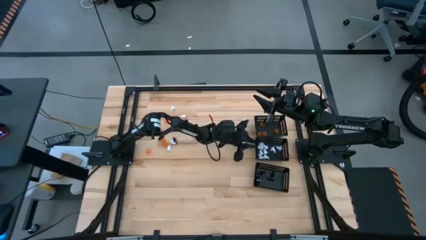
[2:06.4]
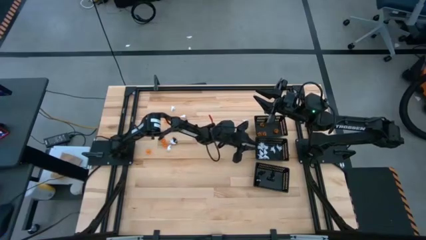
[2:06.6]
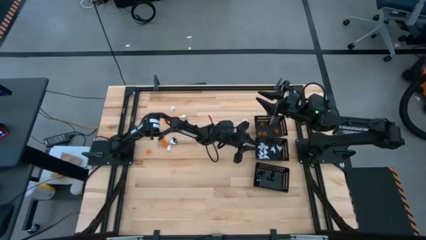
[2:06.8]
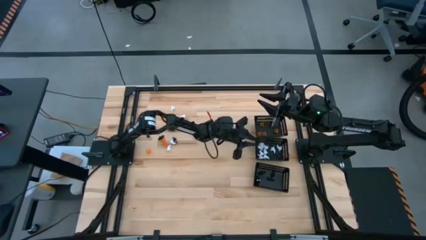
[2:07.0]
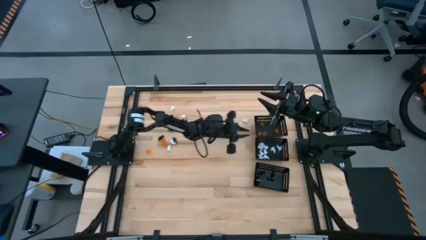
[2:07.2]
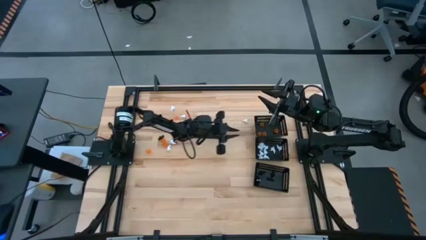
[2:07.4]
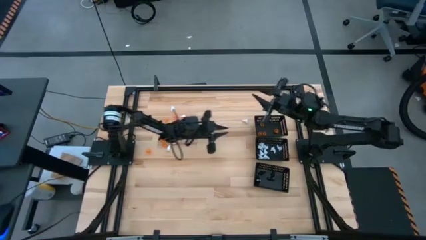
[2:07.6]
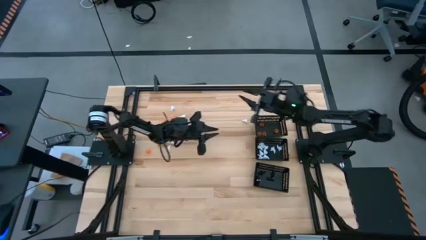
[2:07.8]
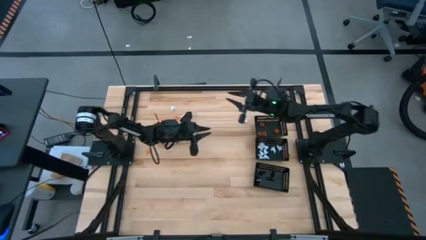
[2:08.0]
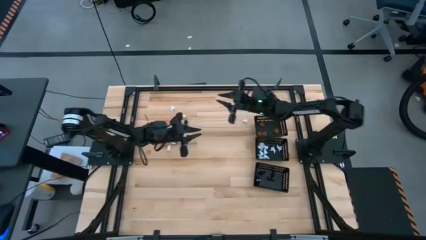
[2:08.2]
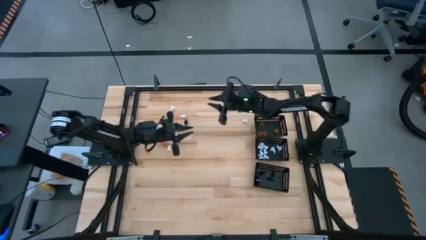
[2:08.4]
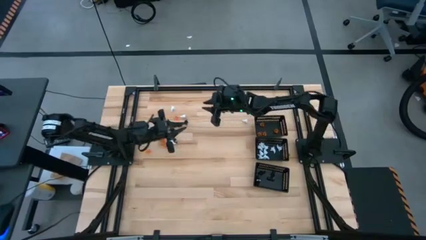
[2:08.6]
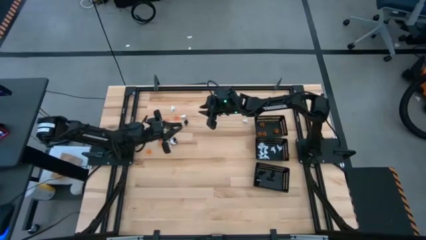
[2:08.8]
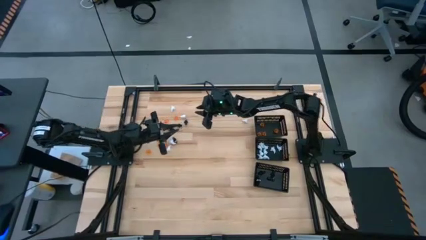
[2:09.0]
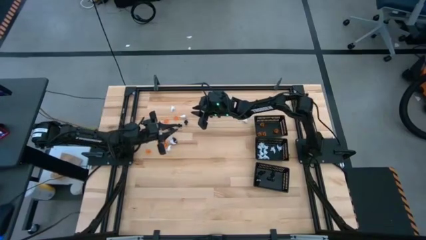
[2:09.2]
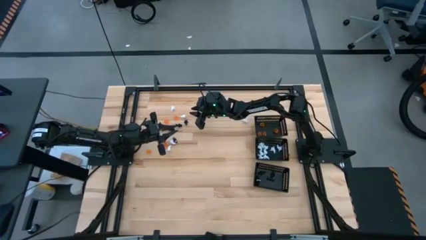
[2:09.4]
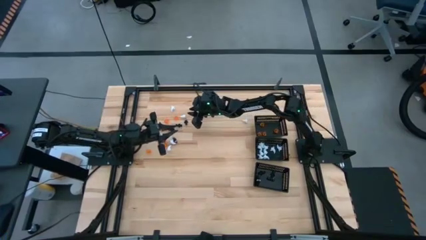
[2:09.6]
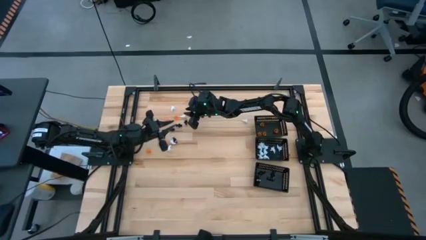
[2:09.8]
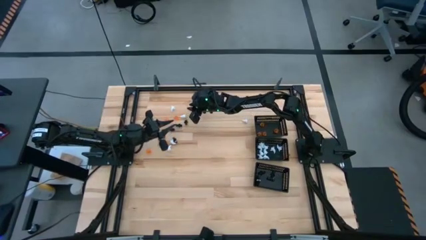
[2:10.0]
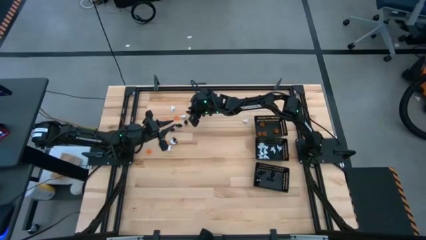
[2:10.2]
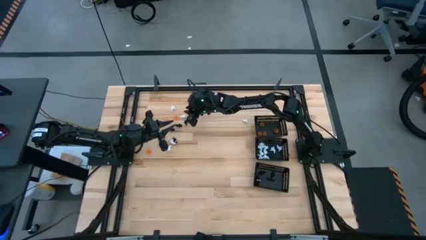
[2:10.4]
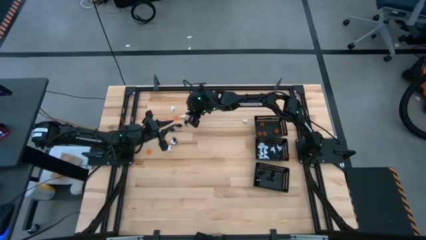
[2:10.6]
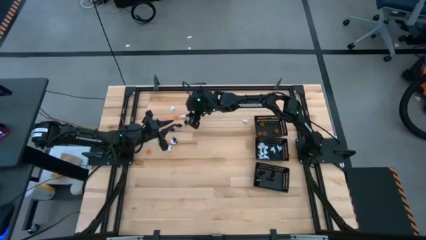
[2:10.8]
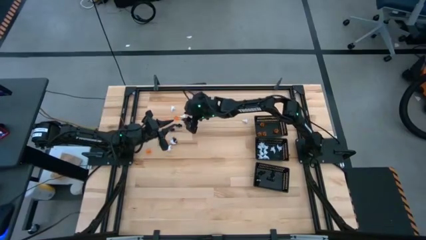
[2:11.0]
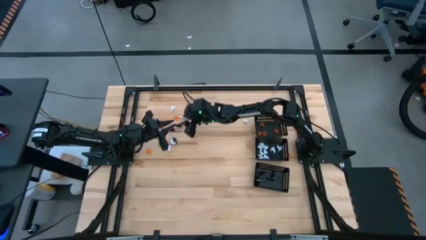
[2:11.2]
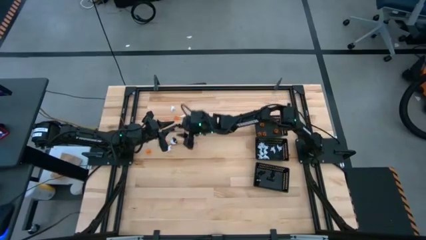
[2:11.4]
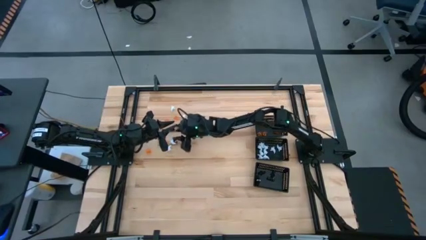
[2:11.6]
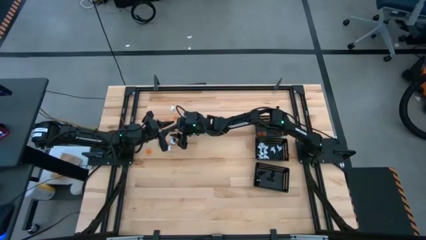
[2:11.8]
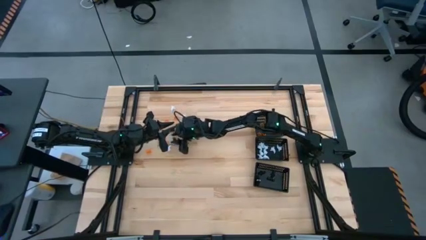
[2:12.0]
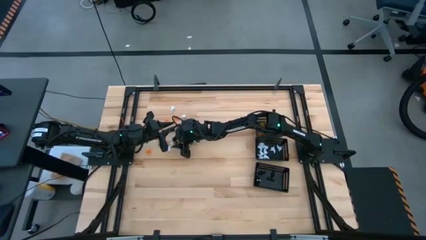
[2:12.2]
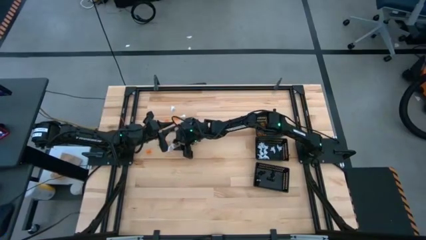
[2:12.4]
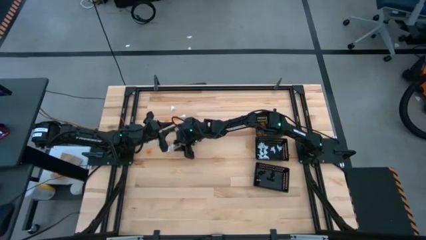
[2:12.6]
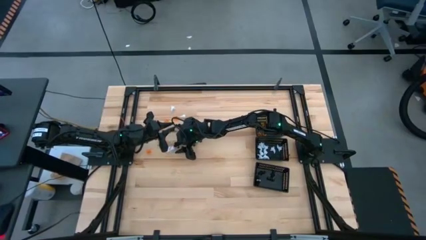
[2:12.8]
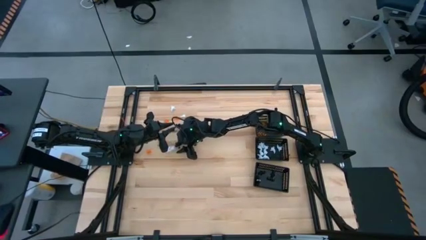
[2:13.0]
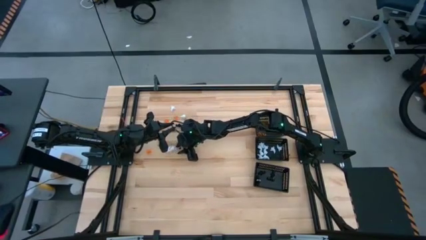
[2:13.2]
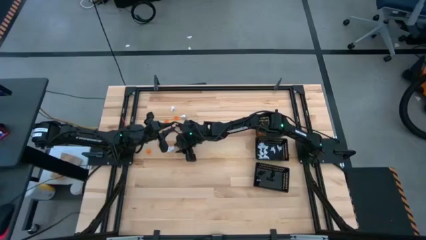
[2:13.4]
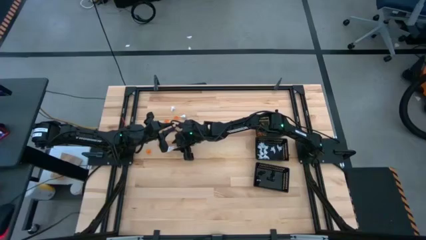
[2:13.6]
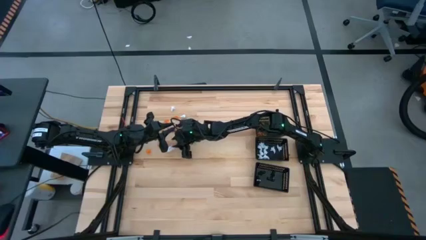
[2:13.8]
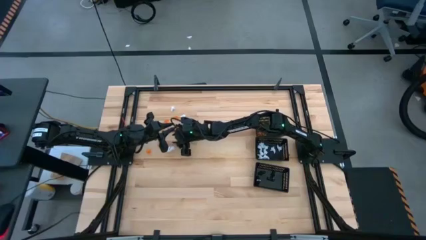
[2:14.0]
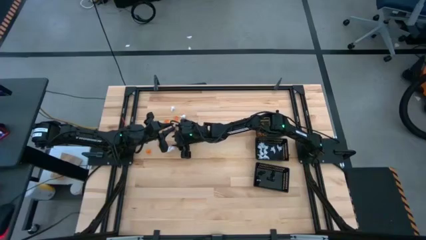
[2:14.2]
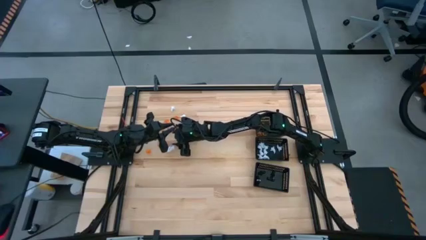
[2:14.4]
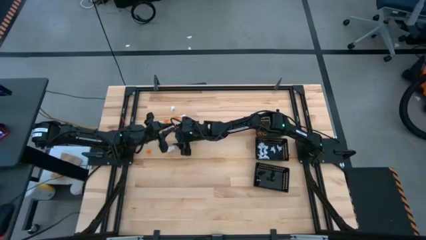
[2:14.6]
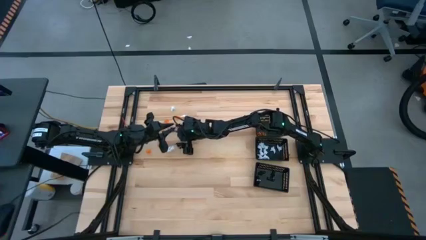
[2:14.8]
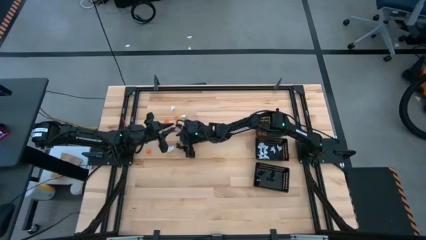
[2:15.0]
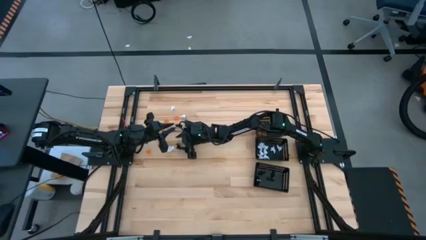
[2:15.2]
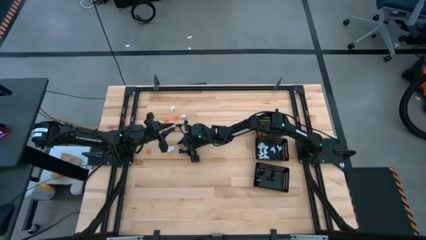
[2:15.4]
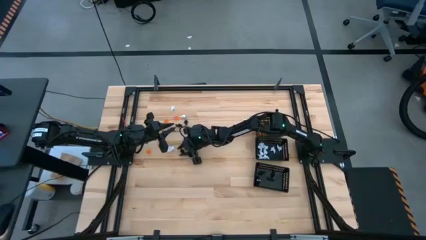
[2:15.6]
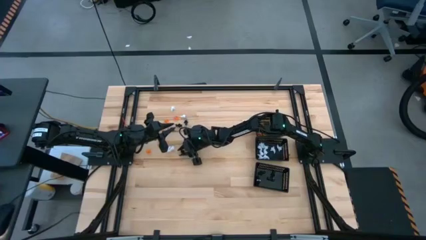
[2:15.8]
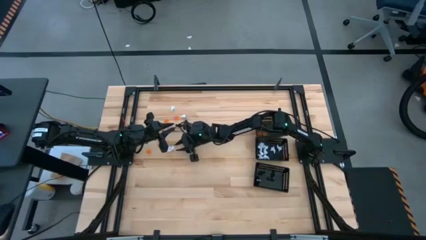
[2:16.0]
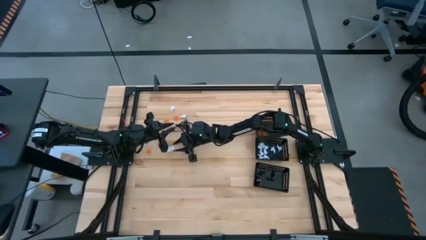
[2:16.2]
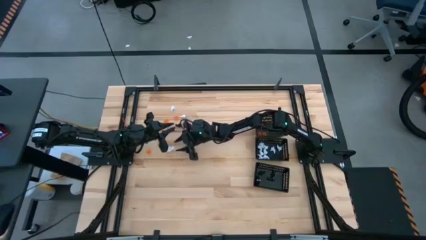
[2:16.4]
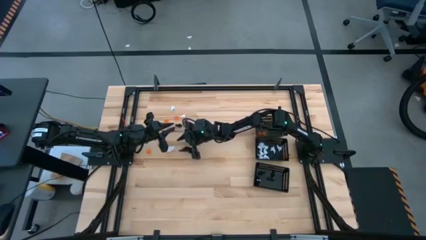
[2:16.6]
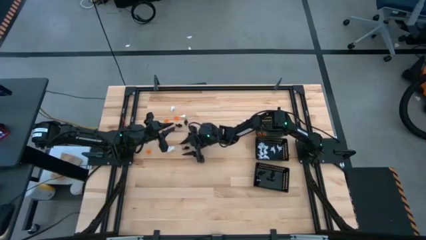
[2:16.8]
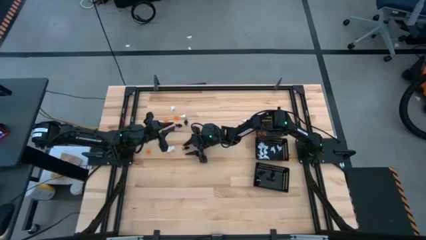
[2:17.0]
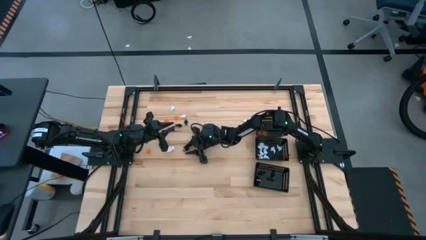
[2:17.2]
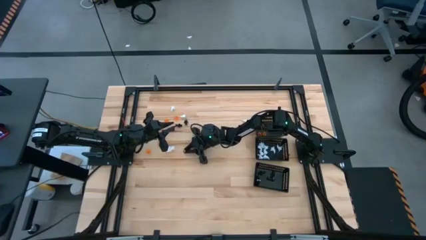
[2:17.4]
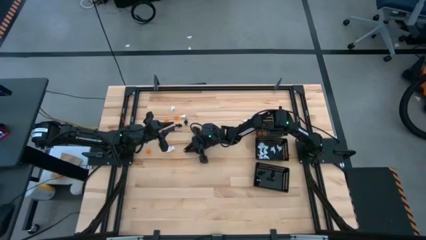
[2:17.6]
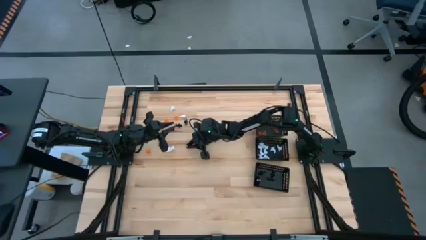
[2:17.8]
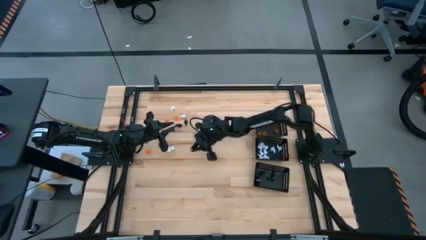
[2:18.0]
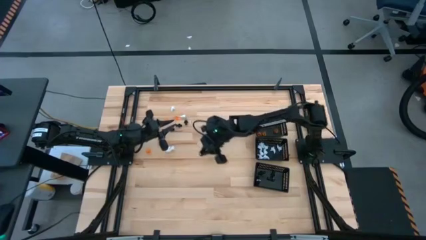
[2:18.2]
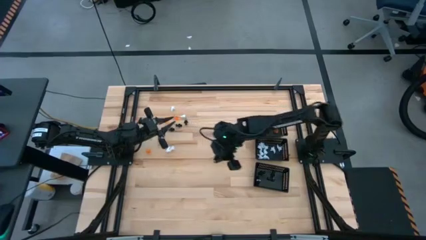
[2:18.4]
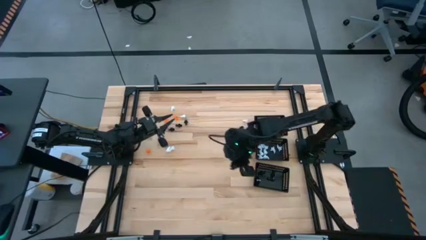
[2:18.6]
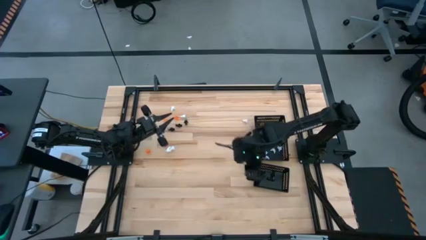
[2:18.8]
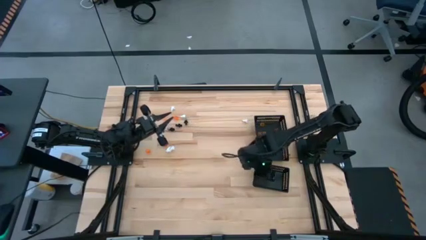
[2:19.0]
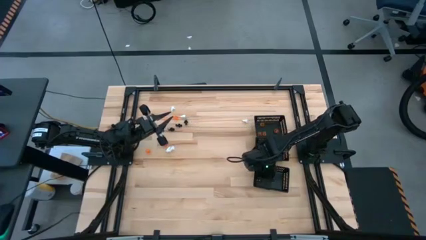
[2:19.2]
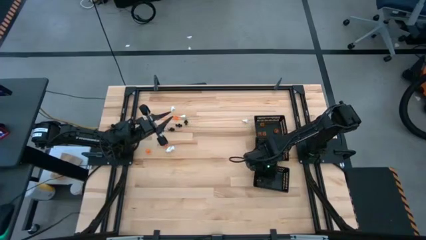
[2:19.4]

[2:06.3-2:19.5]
Task: Sort Halloween decoration
Put the black skeleton toy into the bottom bin

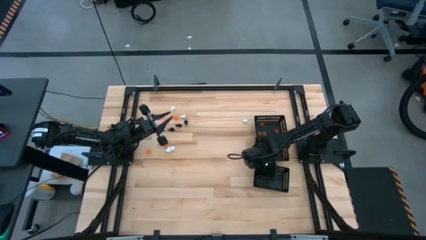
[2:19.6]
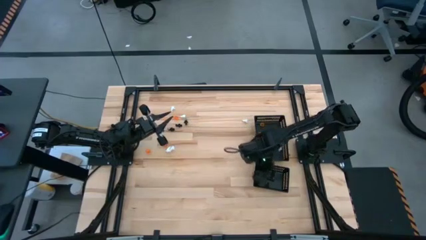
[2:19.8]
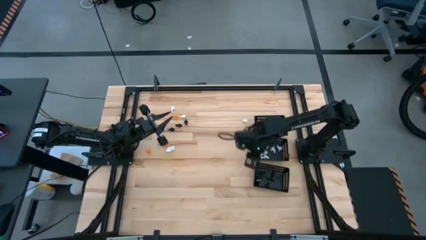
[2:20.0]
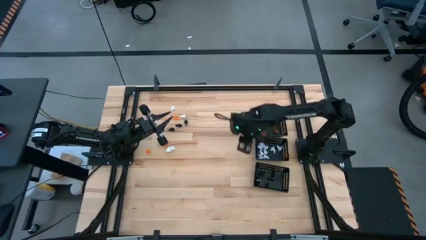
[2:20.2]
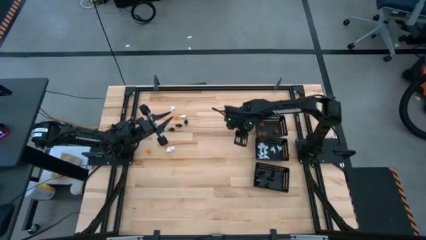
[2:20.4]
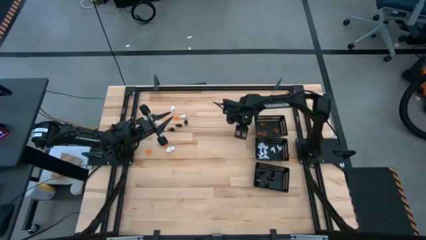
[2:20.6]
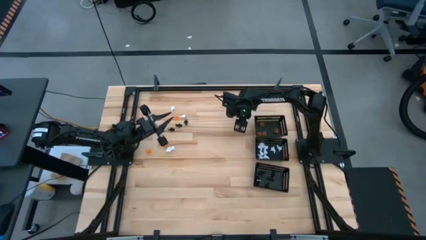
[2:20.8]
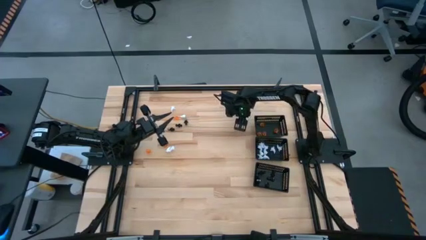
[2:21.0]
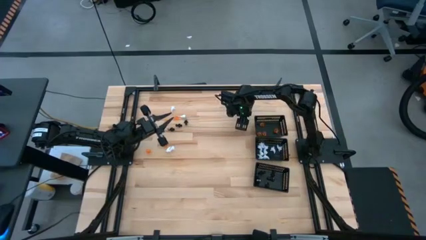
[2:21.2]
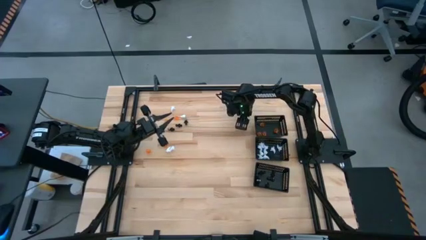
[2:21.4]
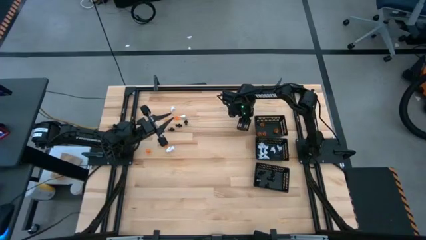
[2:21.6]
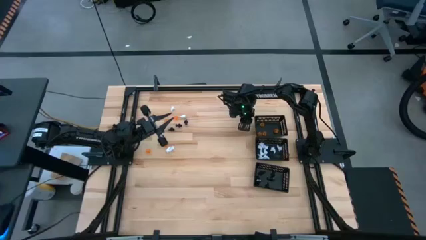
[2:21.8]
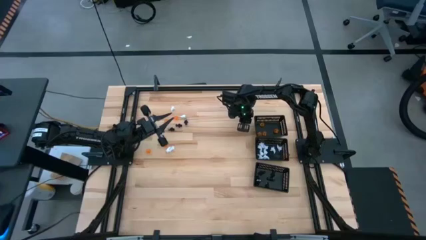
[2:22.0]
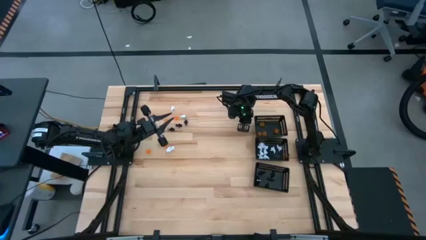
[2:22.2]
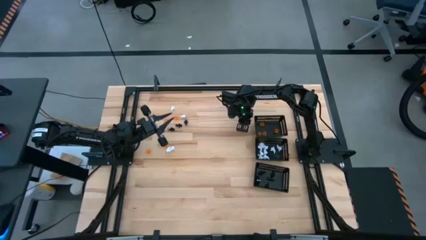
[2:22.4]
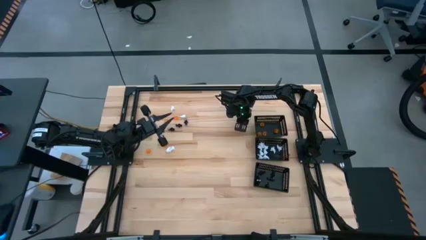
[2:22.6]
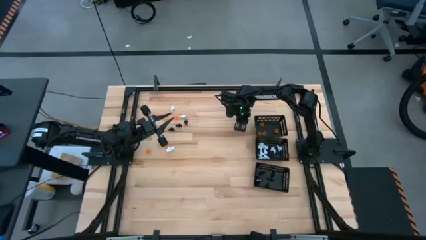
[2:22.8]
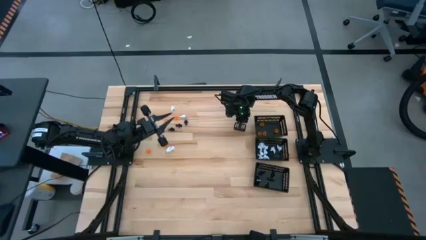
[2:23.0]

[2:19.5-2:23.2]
Put the white ghost toy into the center black bin
